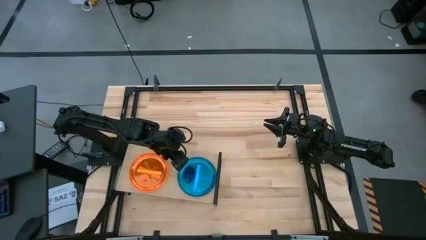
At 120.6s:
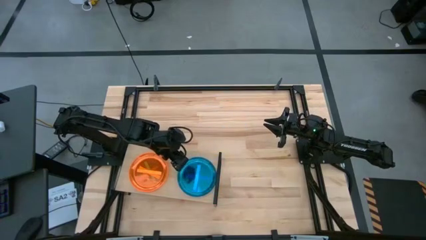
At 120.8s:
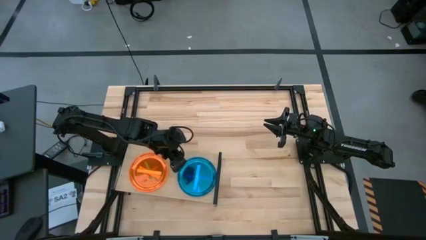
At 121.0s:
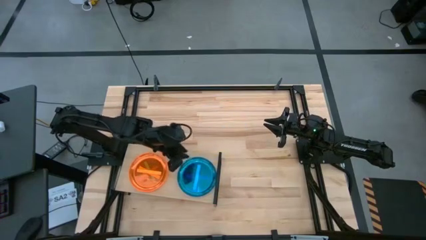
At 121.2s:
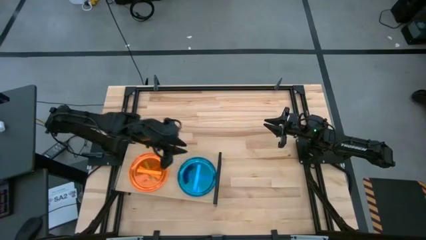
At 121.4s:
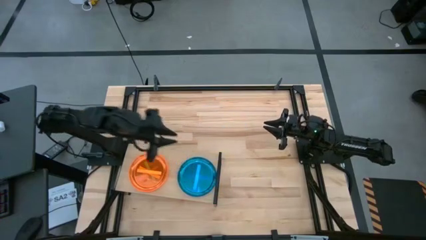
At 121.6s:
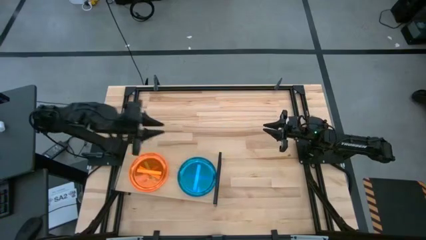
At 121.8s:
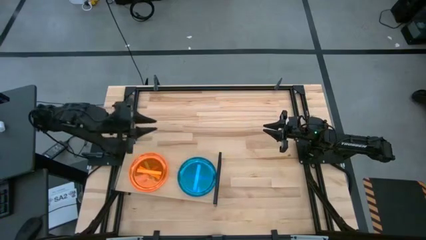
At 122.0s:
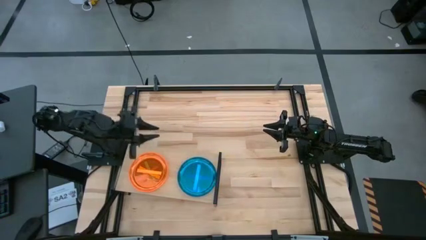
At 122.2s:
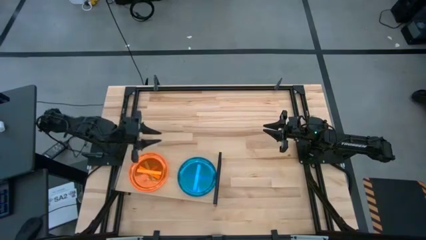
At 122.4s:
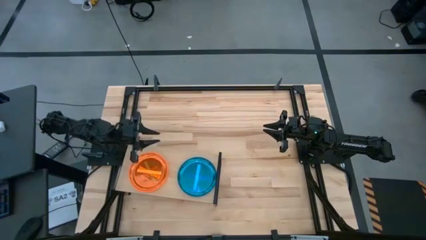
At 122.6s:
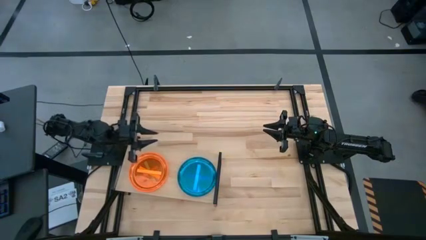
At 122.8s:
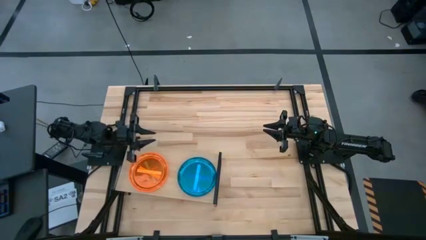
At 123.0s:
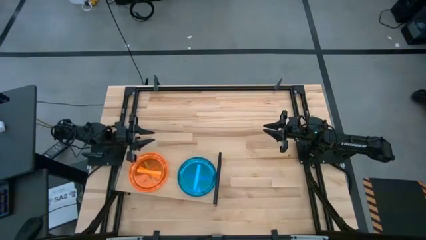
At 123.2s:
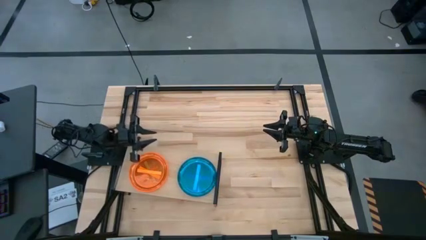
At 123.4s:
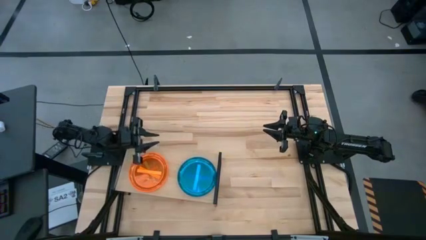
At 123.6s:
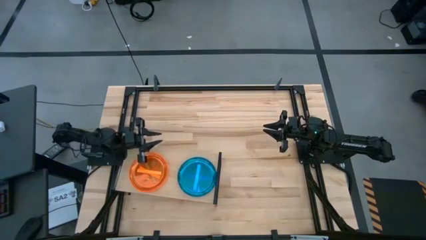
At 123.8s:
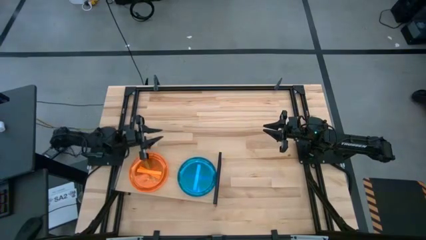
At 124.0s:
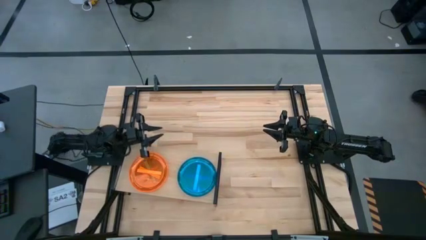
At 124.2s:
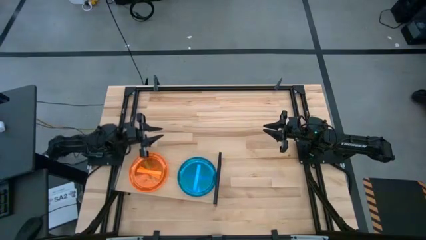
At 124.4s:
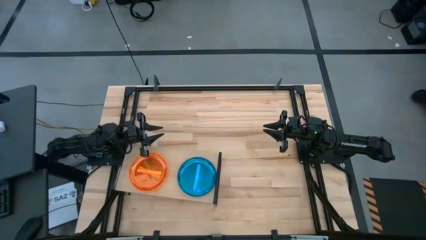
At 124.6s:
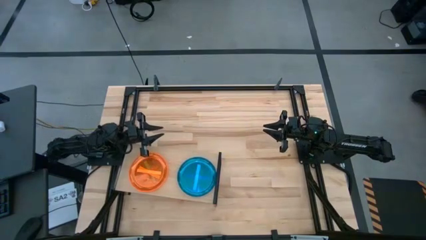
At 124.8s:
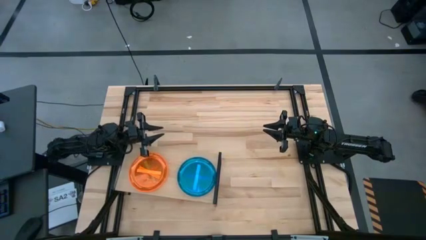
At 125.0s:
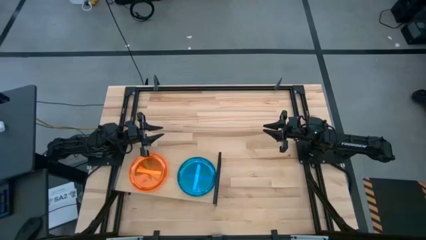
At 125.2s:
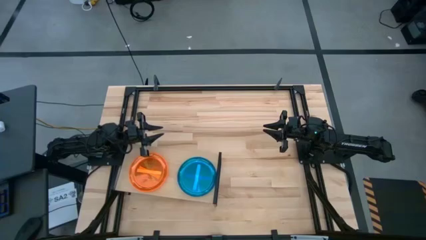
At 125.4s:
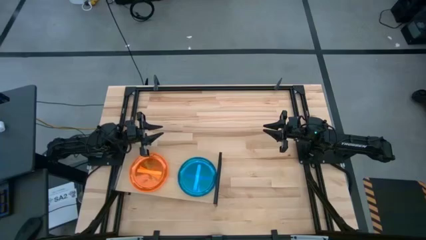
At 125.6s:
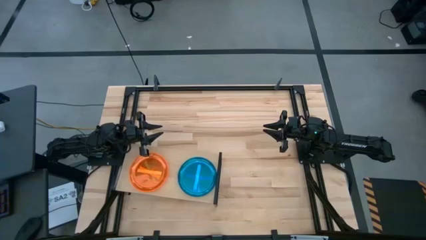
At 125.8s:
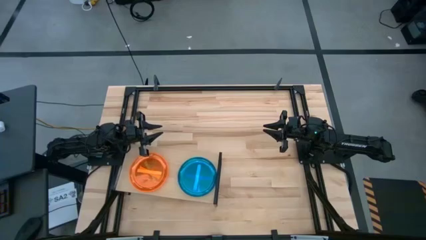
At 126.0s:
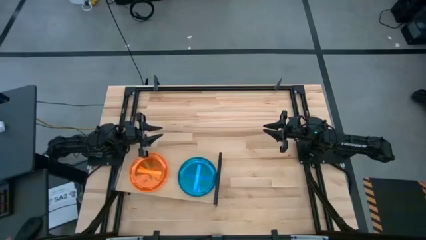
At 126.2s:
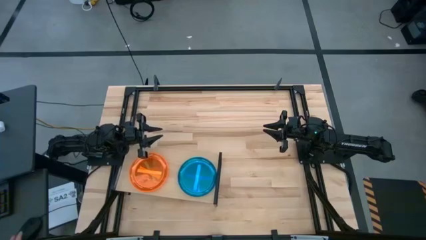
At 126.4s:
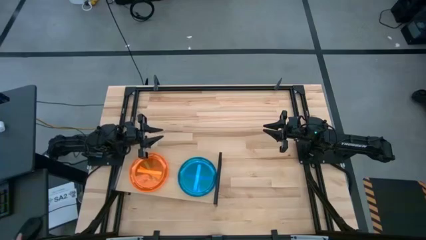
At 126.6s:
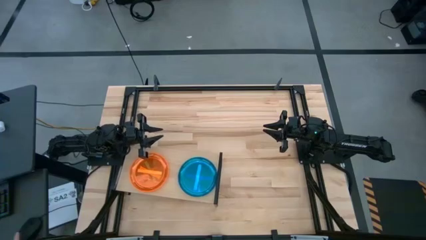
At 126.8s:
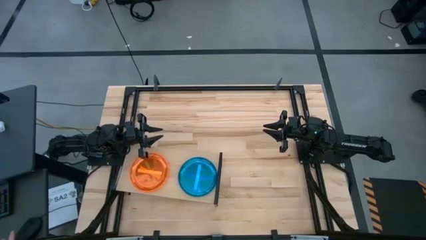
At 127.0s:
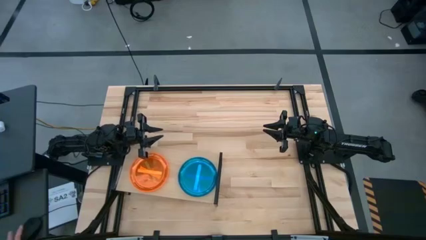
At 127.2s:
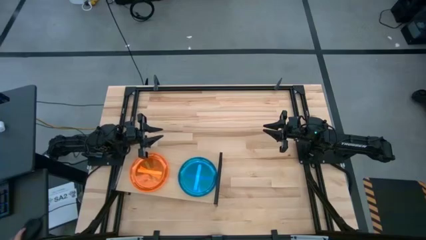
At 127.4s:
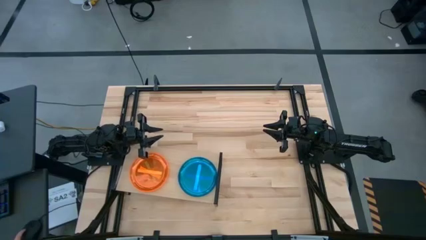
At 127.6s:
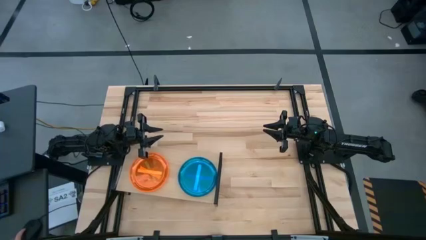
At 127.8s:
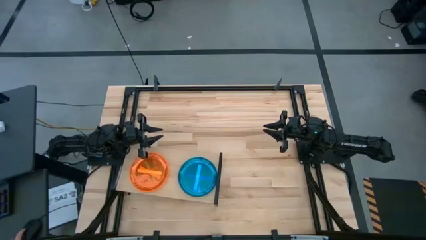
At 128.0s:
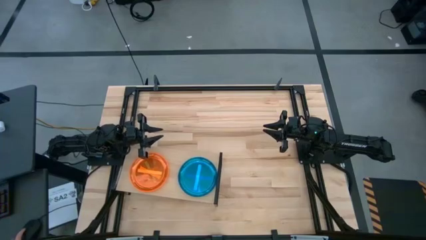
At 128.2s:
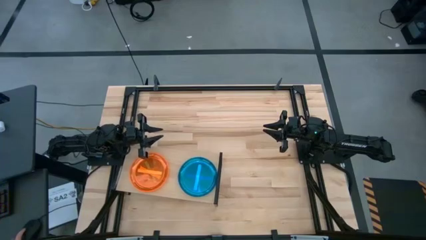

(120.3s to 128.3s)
Task: Place and stack plates onto a shelf
Return to Home Position

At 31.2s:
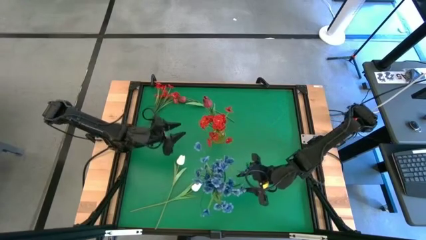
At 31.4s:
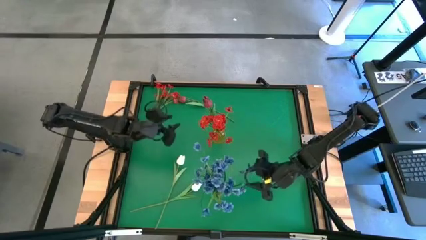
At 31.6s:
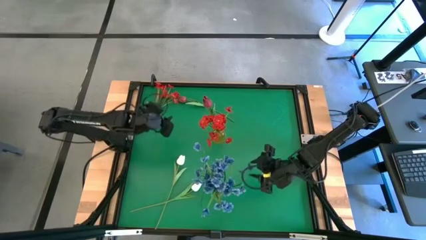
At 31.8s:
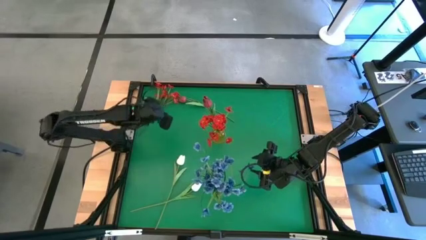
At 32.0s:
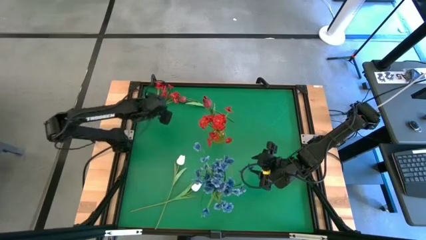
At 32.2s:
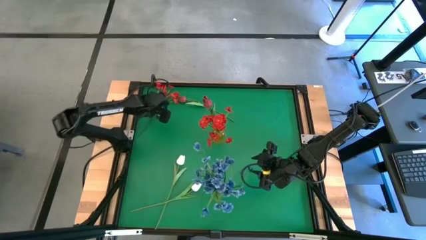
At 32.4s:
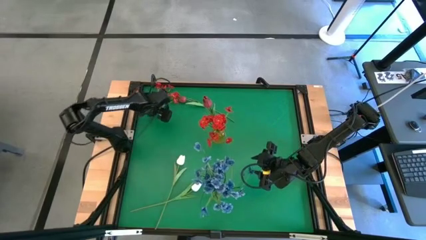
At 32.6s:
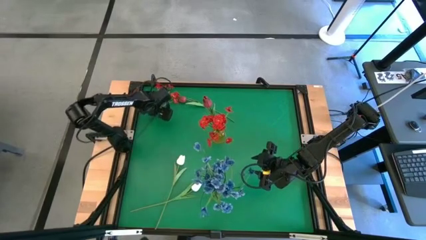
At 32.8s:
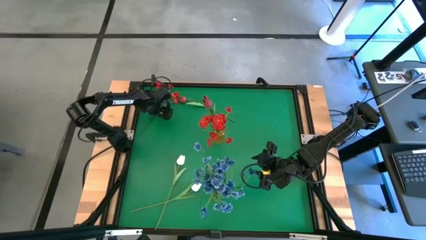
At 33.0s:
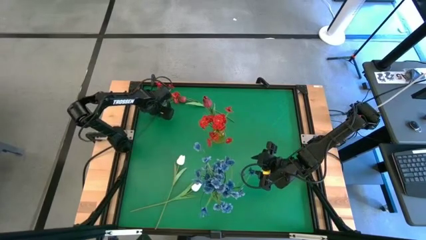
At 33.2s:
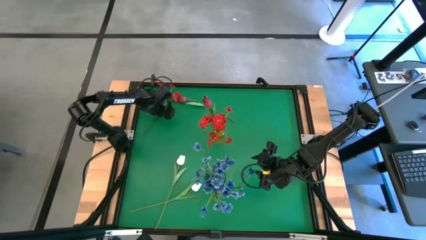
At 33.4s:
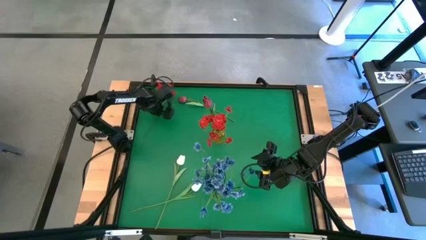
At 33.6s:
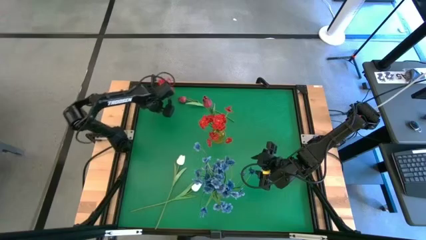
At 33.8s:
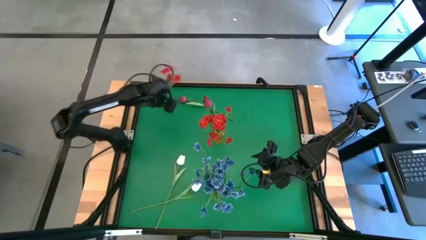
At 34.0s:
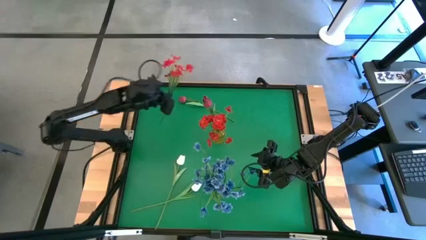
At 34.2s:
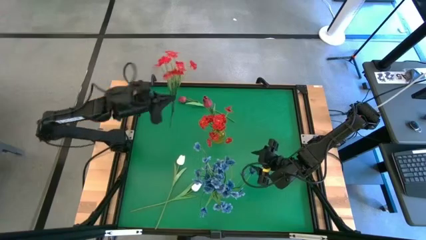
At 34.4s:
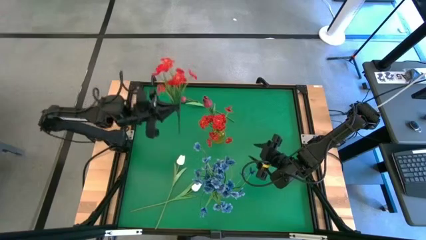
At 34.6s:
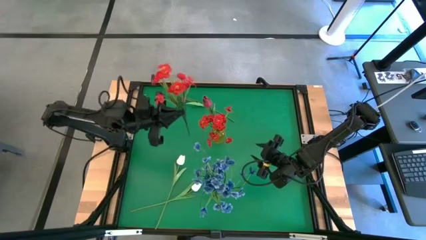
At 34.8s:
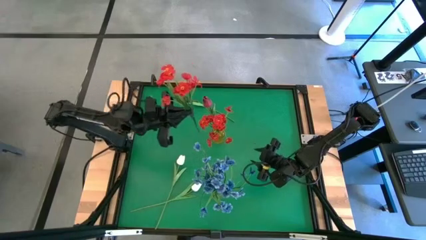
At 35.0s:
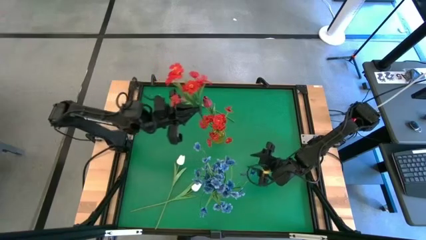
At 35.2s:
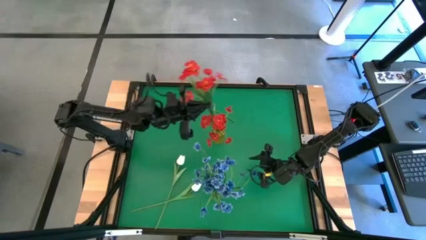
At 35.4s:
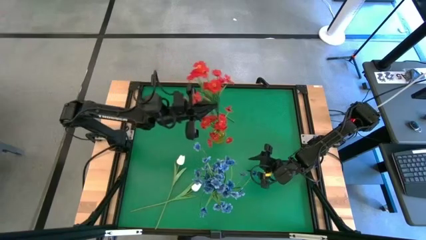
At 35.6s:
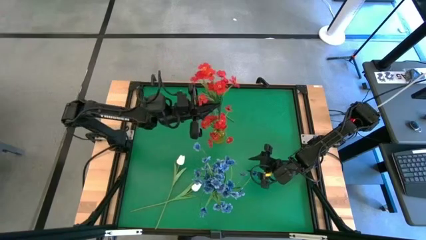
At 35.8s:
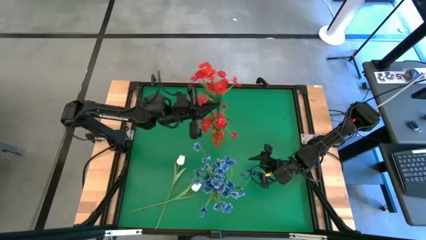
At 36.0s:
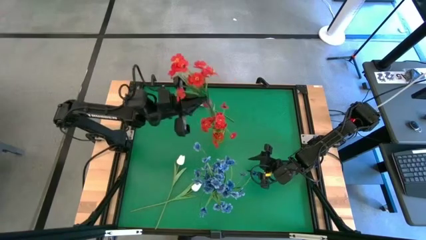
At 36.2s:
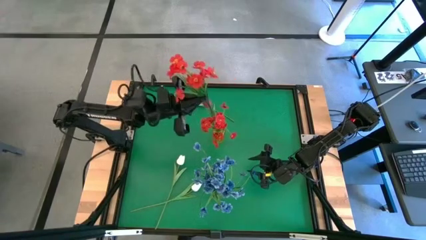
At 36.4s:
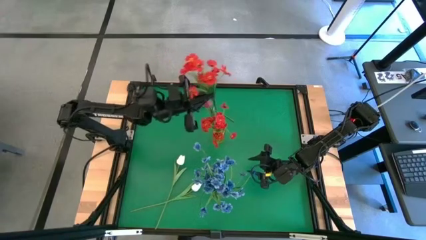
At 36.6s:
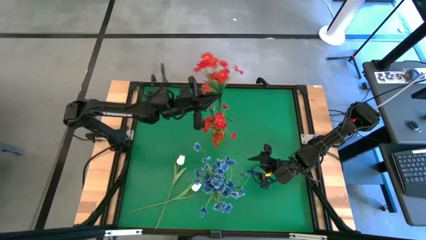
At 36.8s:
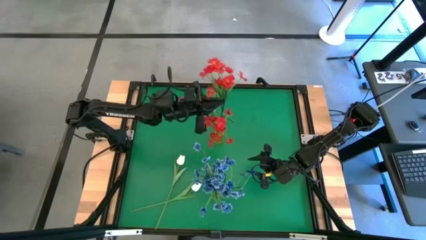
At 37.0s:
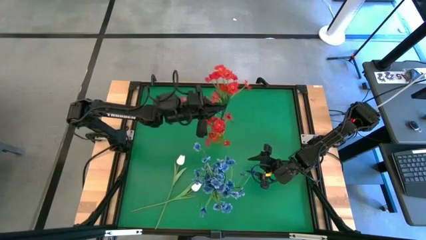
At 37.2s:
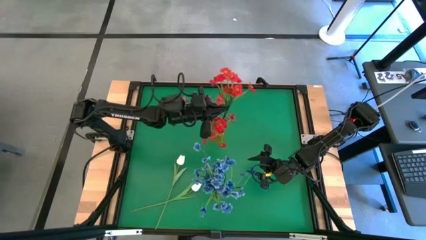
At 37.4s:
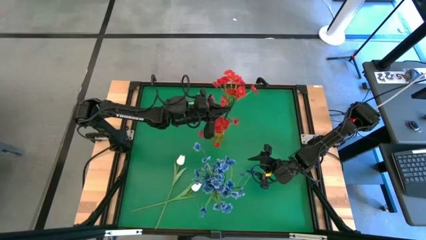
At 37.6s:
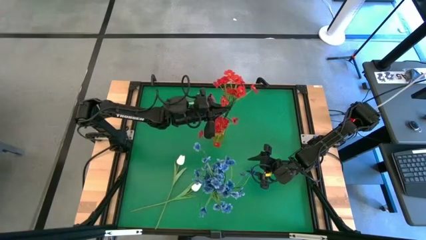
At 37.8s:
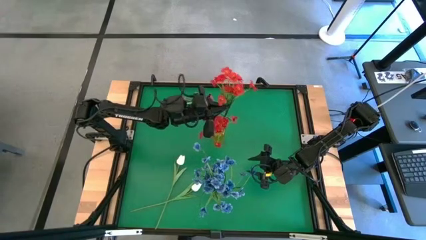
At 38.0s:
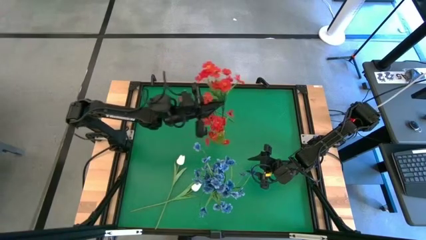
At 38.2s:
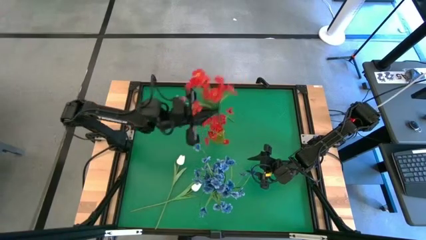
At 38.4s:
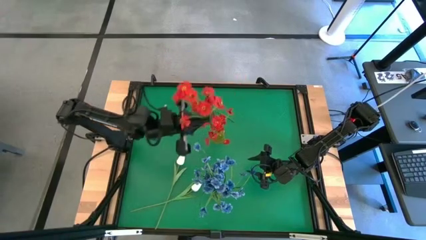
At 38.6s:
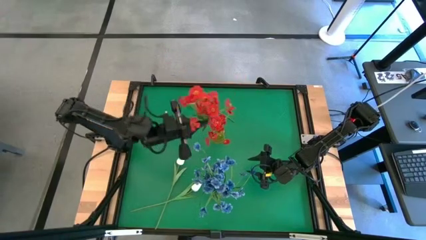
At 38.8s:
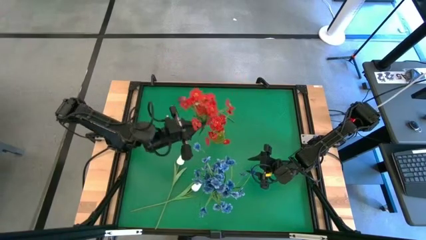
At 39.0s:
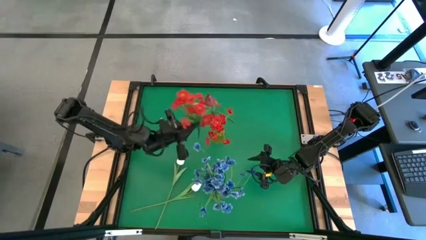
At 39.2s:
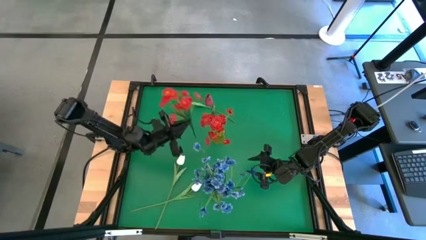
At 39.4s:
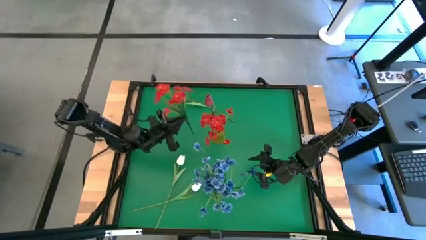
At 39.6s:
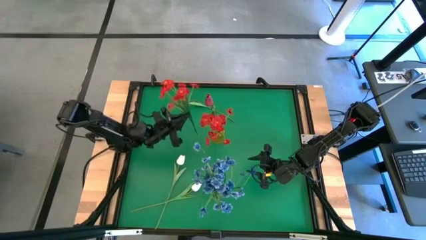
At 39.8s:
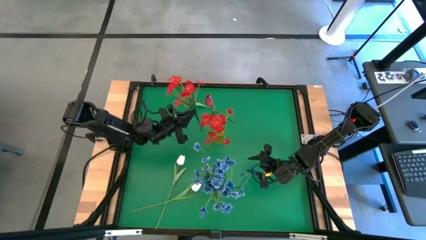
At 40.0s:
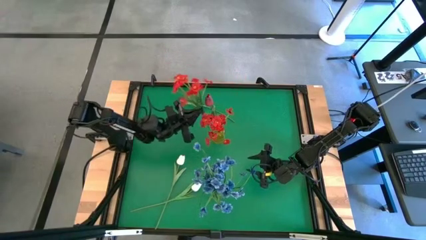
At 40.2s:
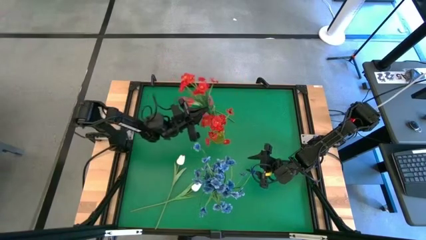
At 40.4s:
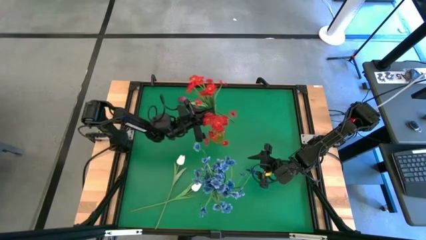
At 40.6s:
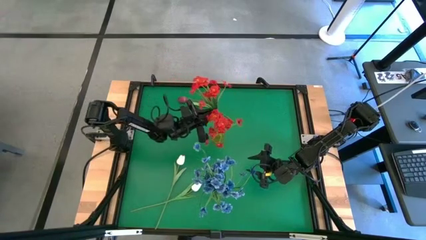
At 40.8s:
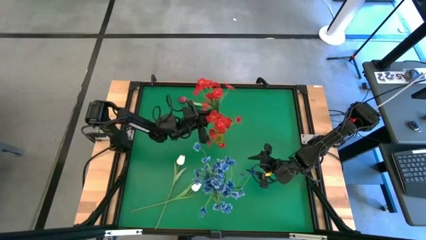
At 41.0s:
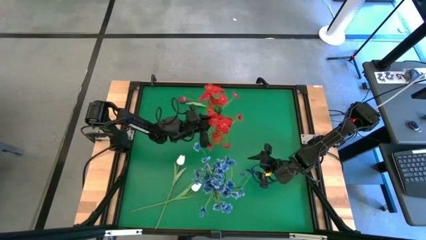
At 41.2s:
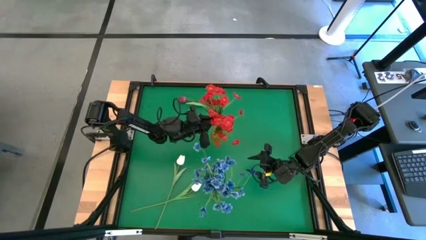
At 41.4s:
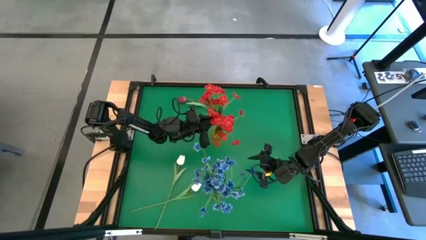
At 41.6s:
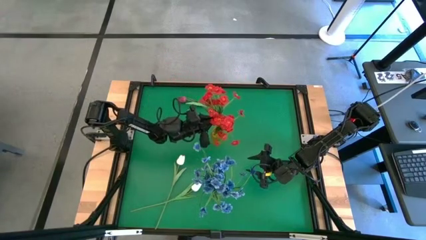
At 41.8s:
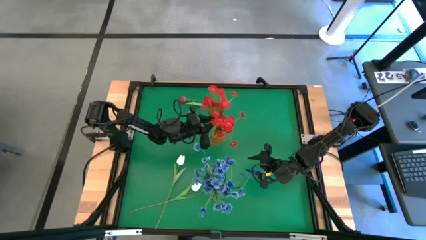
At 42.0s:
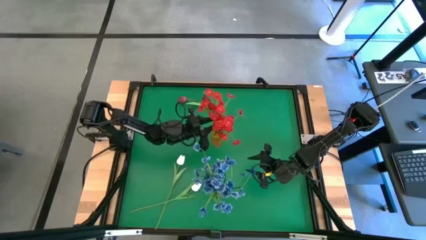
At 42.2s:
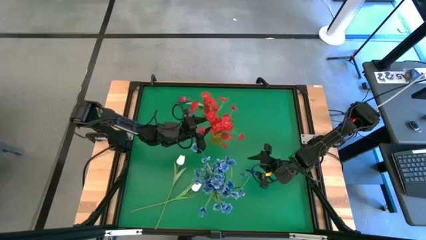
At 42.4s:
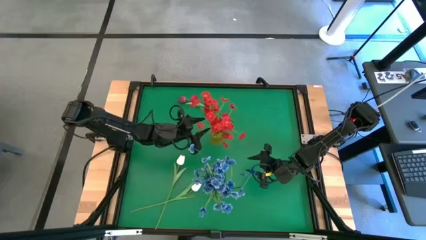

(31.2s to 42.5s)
Task: Sort flowers into vase by color
Put the orange flowers into the yellow vase
